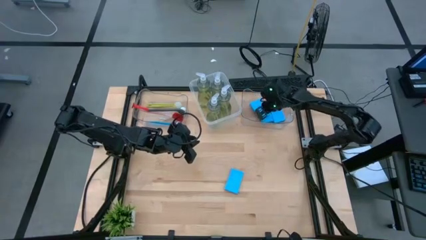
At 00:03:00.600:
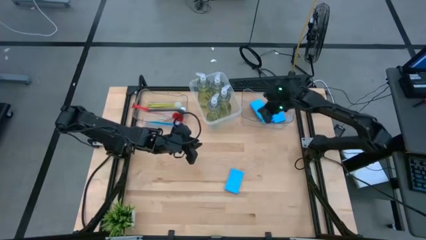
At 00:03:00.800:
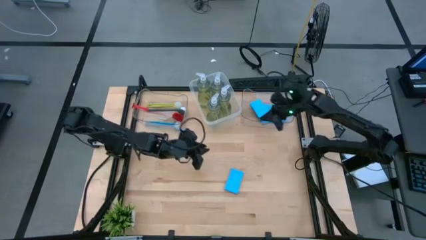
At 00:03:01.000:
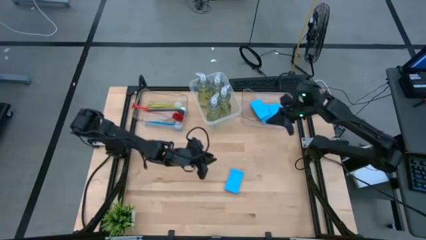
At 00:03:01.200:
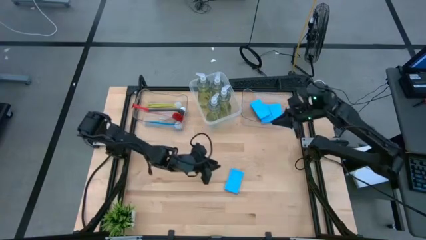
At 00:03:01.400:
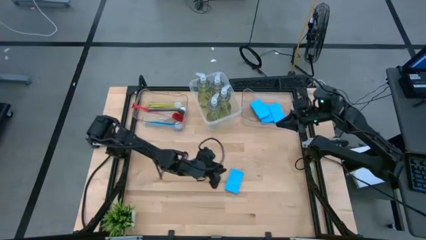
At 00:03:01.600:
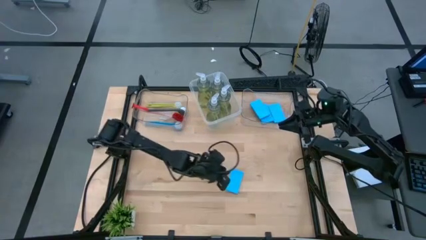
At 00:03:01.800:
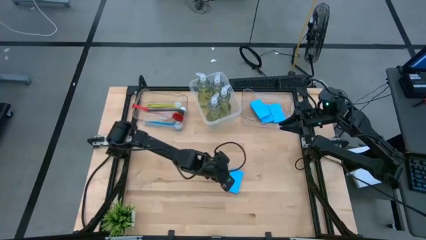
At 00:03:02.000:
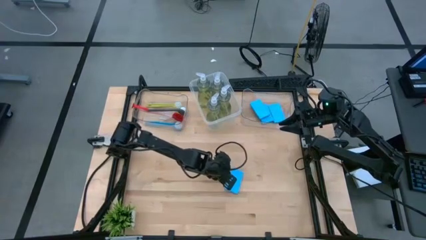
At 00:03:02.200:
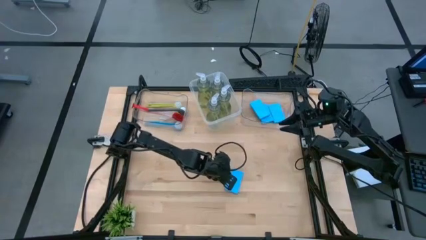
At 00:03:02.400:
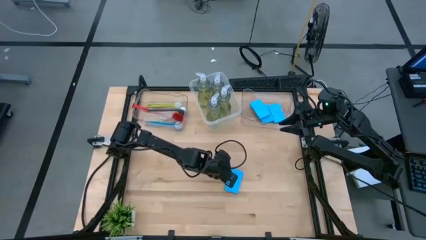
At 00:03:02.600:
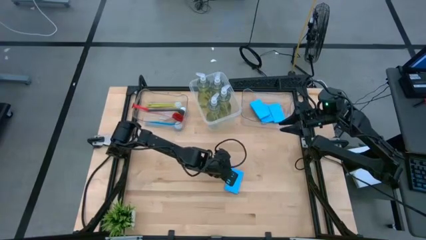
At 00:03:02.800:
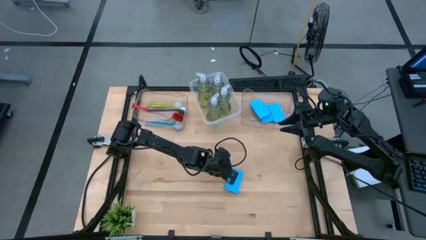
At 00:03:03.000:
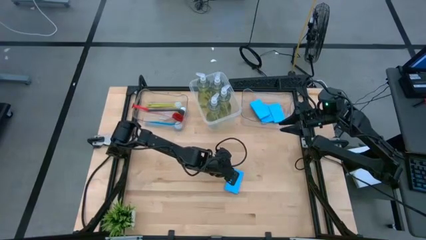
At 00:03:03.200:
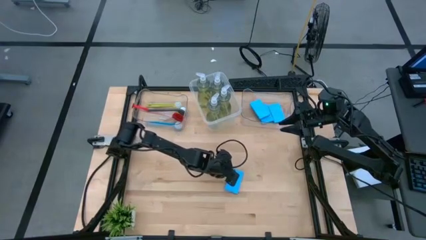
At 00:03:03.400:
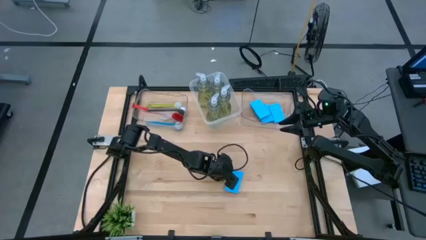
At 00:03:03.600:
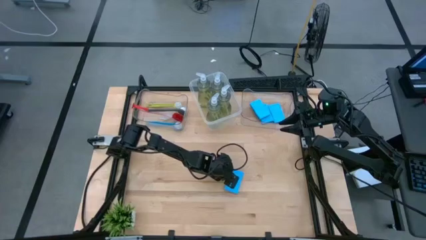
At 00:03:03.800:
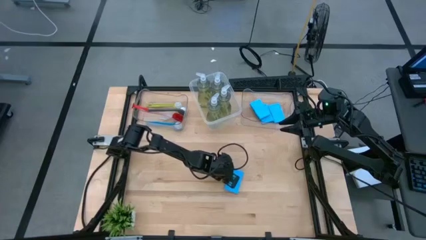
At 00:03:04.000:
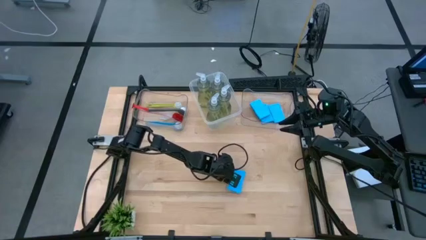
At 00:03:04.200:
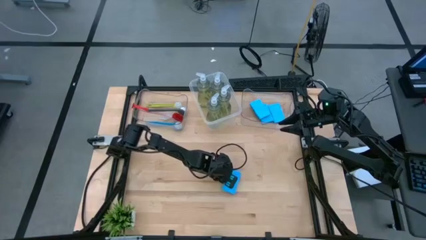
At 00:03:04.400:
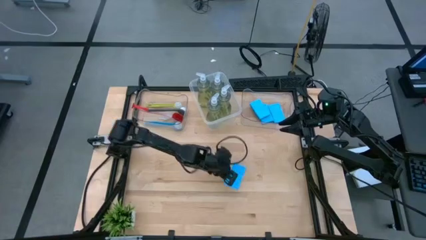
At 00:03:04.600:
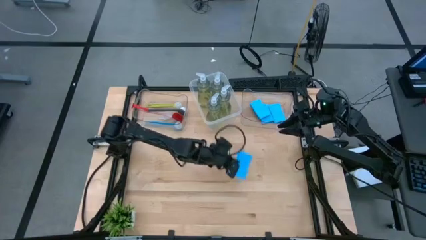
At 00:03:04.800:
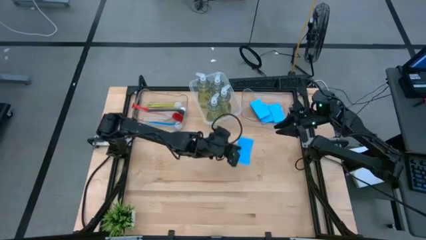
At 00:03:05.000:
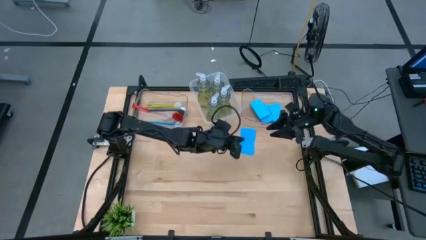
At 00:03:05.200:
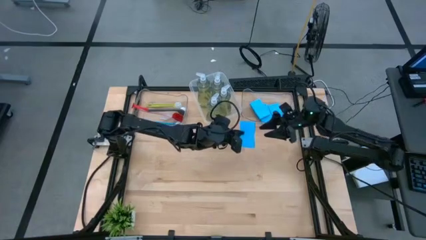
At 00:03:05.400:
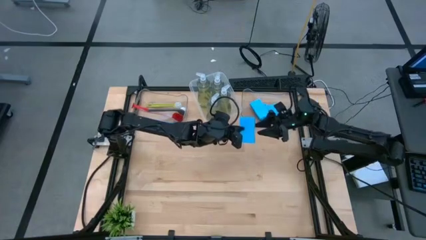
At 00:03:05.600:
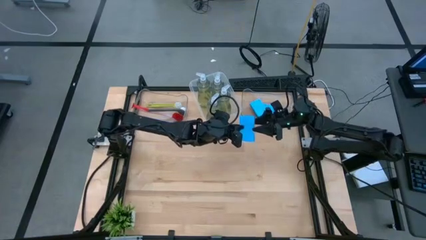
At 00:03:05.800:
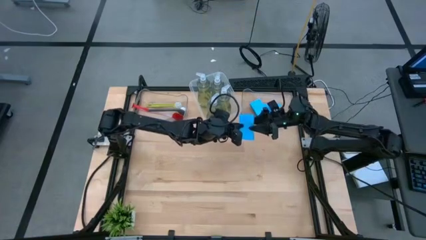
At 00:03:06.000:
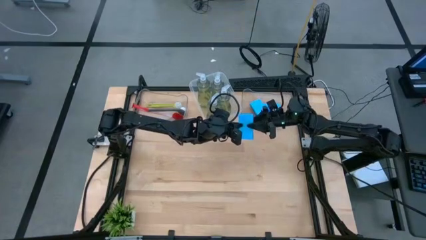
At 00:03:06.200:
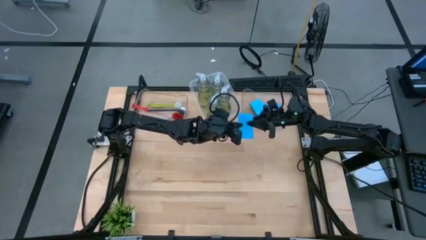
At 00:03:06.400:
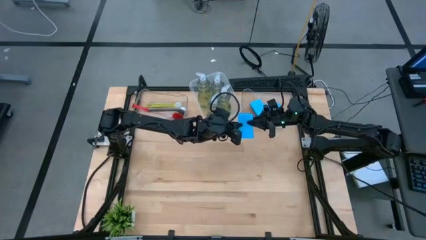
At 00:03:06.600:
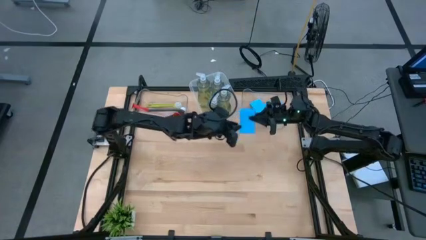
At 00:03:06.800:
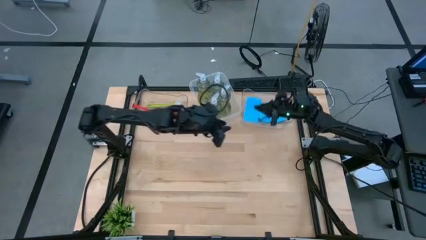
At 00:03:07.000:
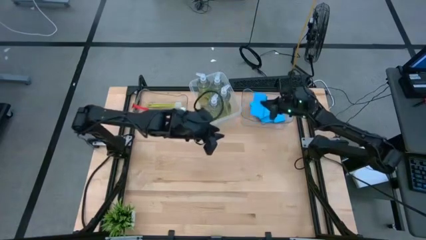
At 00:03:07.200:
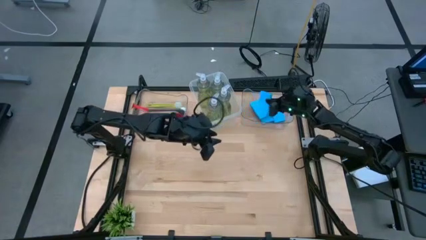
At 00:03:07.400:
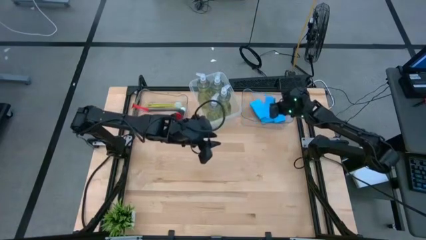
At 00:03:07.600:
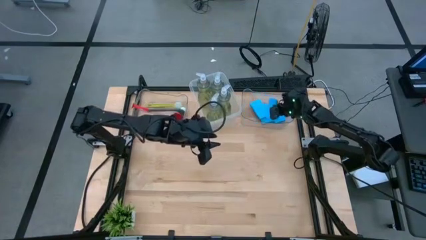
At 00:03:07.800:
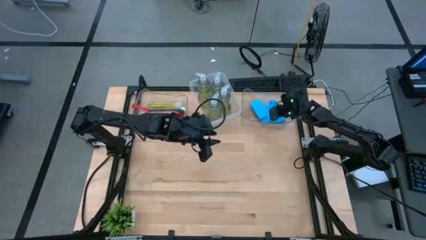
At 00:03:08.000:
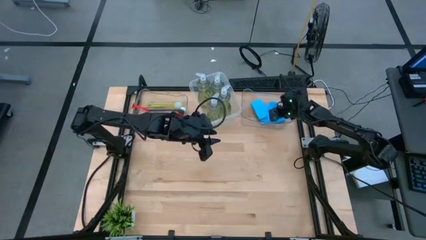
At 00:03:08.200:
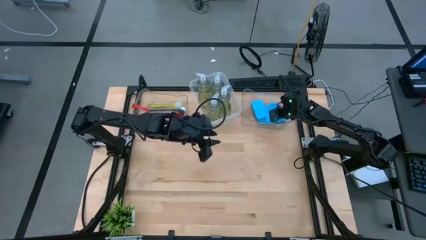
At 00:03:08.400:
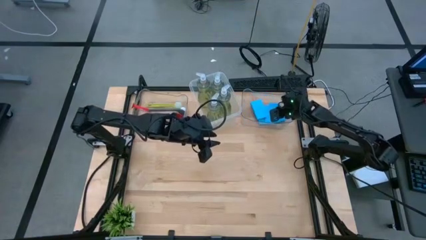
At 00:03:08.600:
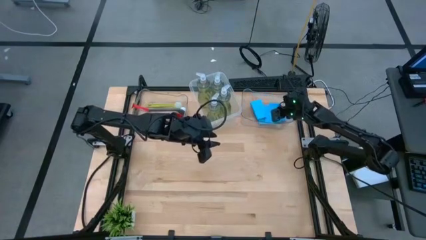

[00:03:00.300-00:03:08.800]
Task: Pick & Place Kitchen Sink Supplies
Put the blue sponge into the right transparent bin

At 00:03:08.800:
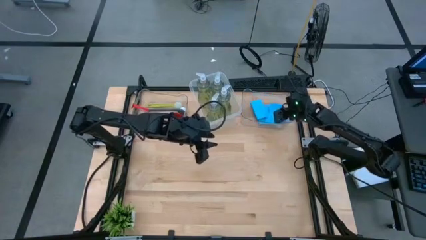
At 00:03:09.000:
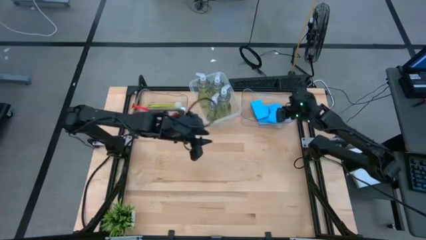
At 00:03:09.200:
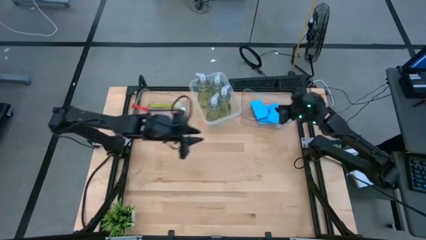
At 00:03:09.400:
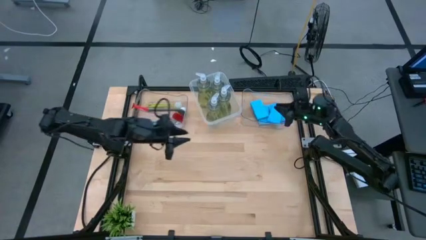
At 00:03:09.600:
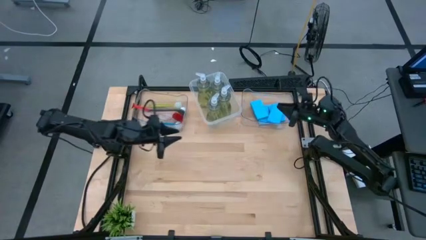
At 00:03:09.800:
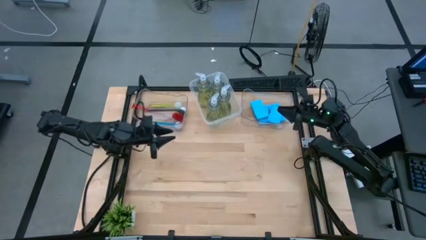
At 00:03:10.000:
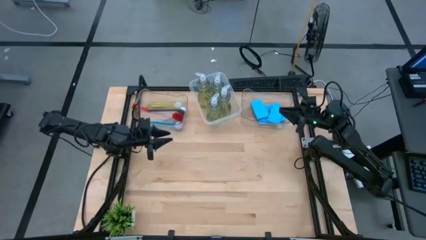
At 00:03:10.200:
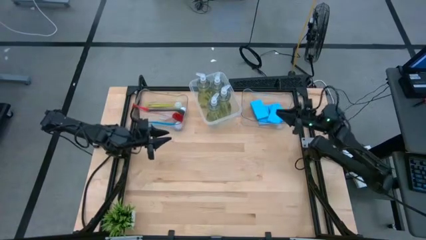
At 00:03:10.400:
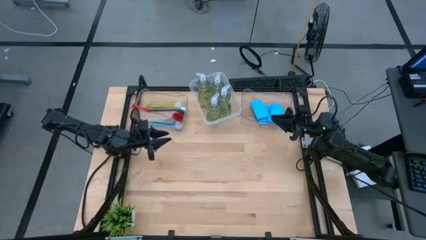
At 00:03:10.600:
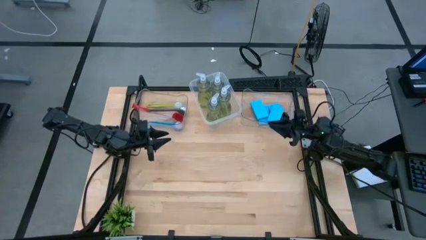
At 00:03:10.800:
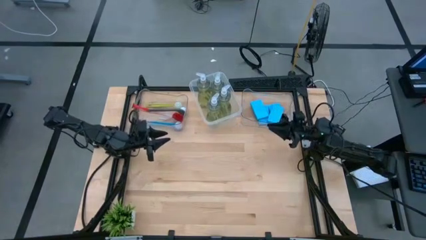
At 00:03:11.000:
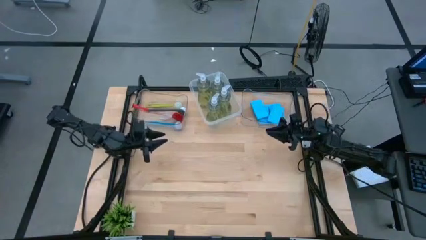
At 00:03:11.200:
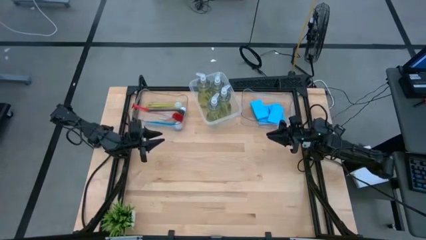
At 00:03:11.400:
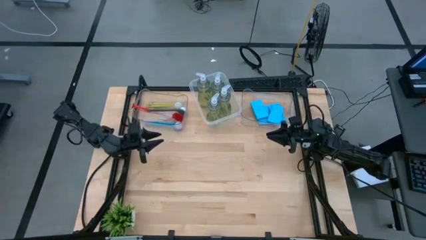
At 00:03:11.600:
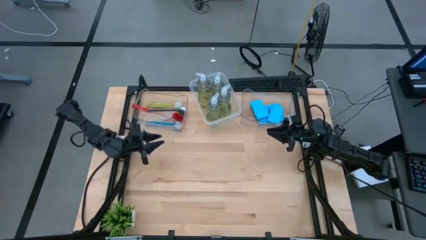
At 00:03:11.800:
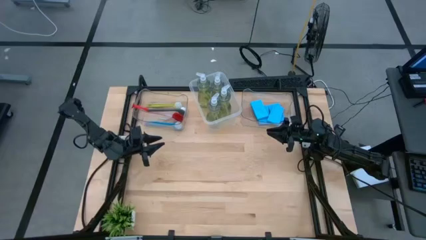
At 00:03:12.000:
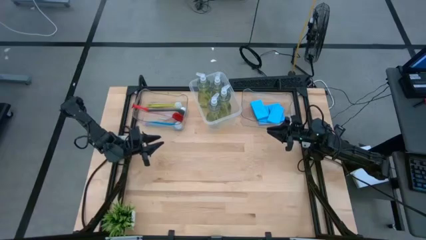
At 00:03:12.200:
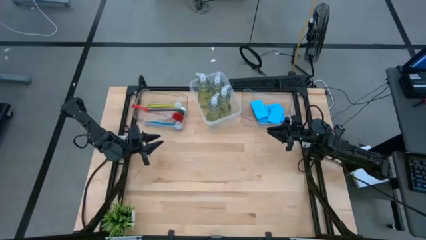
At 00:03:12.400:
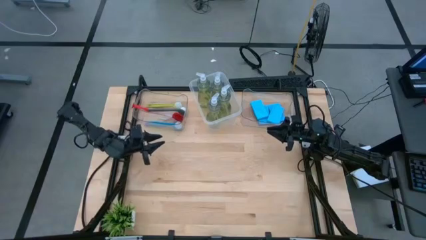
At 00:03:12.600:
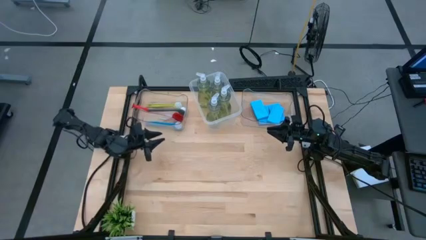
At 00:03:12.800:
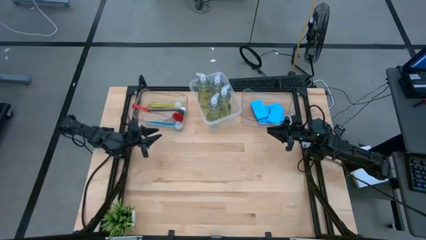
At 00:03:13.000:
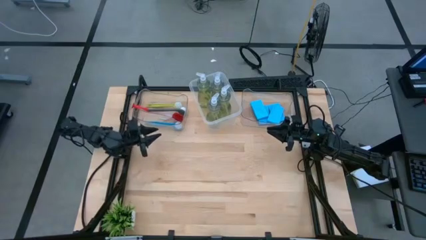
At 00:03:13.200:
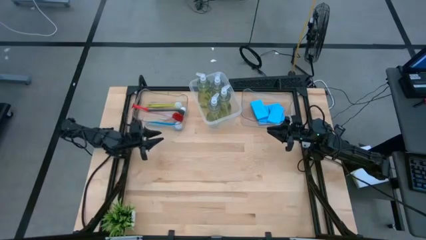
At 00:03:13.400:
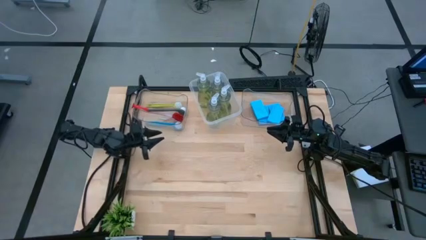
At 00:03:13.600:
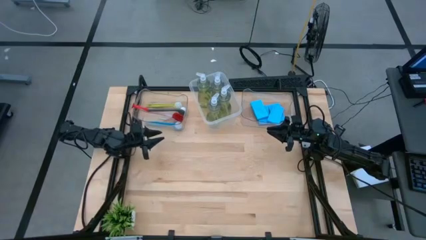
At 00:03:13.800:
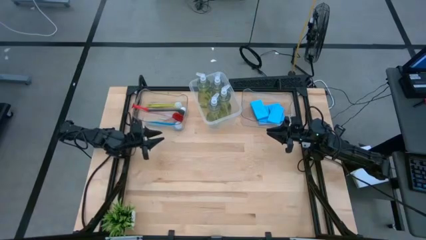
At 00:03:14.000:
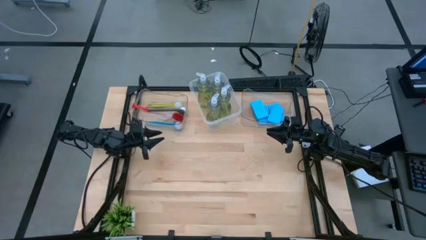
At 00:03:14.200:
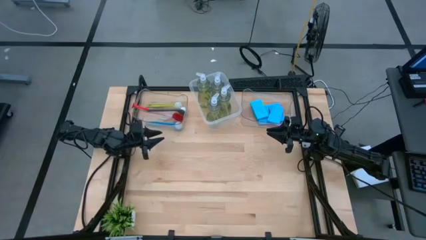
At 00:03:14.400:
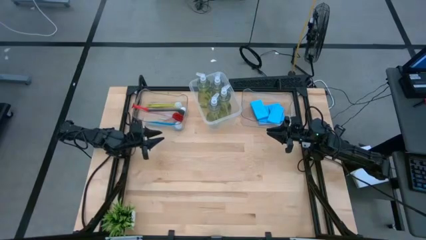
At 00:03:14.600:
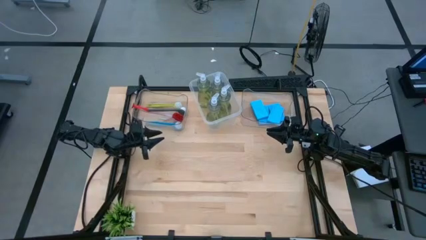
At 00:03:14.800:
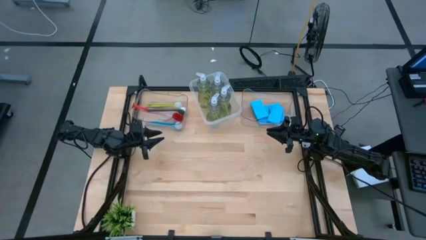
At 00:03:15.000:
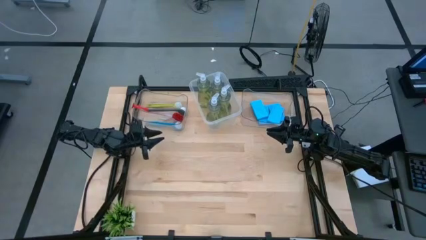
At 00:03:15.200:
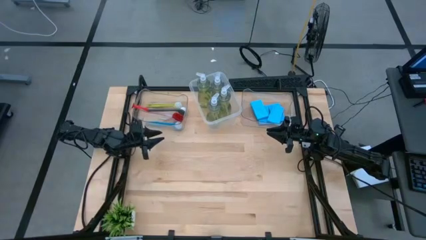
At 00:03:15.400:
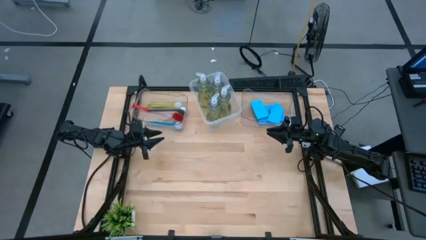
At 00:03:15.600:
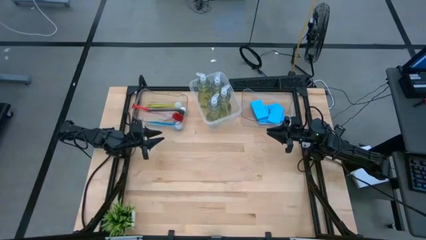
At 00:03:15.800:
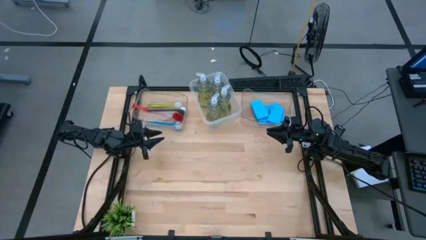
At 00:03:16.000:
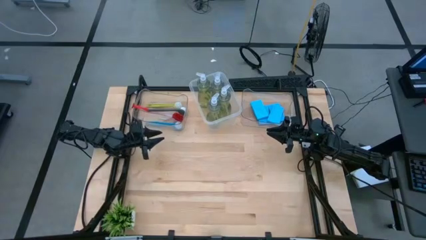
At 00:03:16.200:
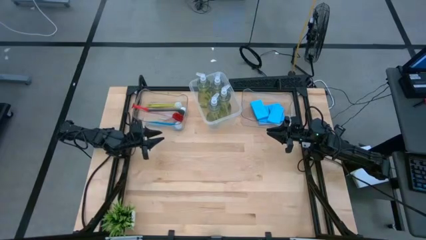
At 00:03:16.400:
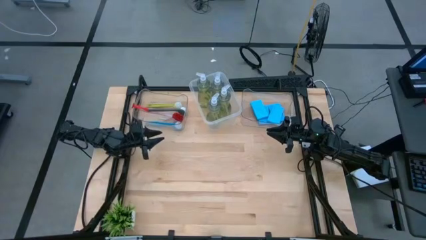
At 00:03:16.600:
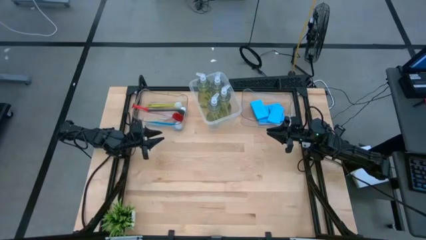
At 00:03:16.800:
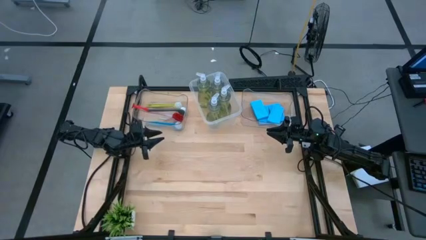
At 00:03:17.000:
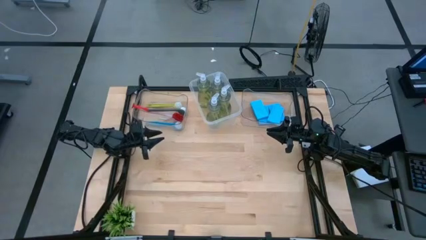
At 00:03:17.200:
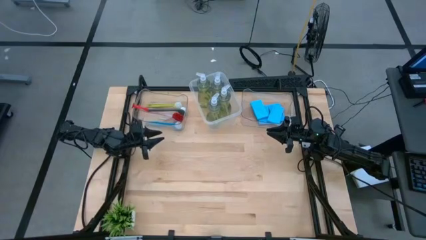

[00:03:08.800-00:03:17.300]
Return to Home Position
